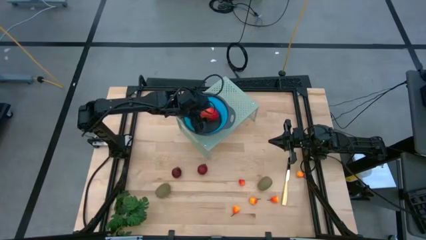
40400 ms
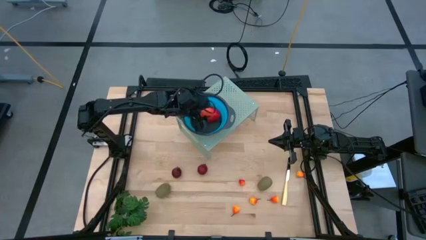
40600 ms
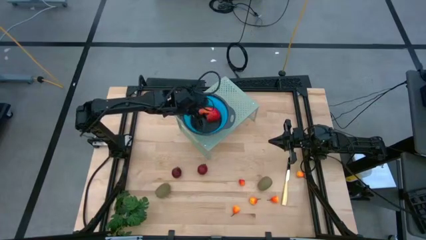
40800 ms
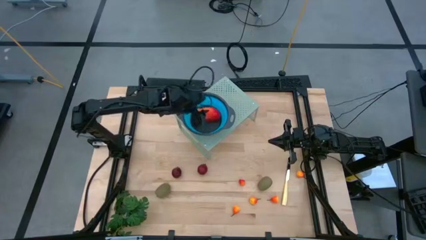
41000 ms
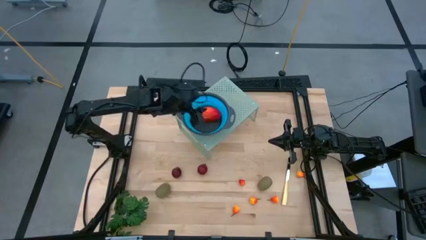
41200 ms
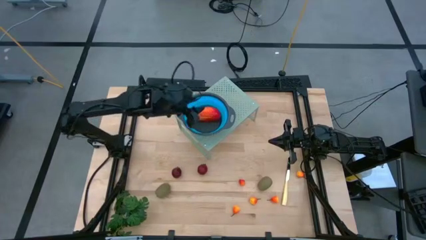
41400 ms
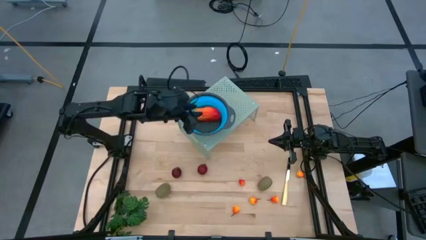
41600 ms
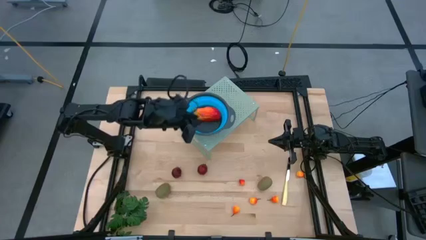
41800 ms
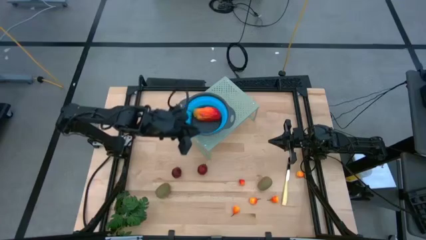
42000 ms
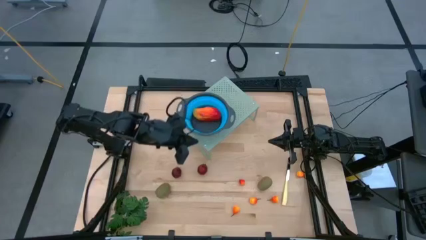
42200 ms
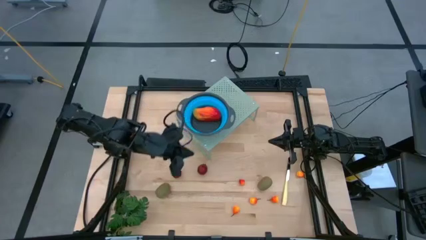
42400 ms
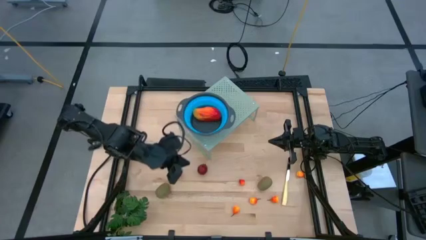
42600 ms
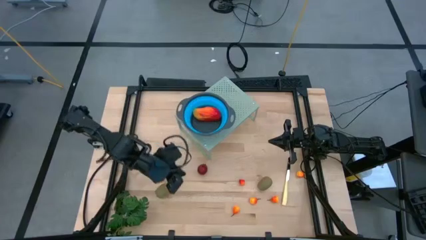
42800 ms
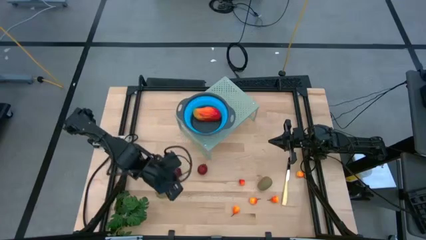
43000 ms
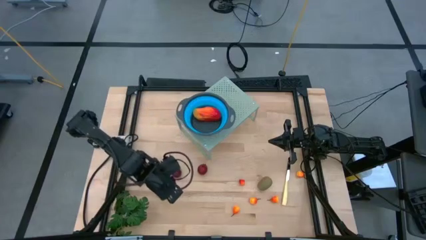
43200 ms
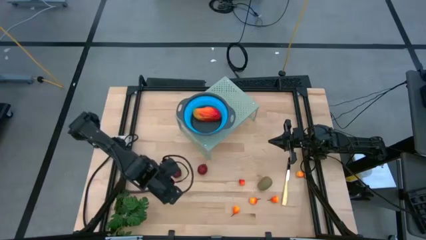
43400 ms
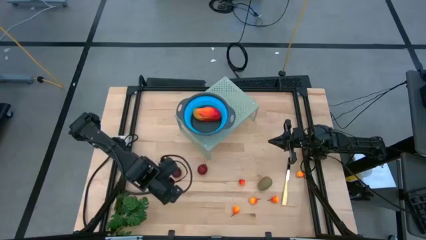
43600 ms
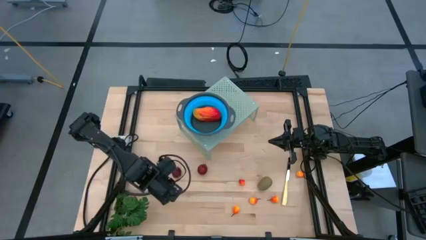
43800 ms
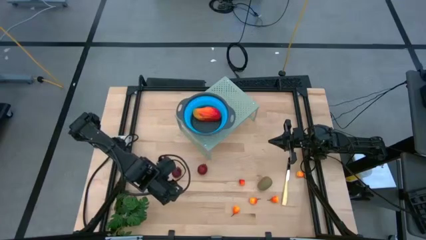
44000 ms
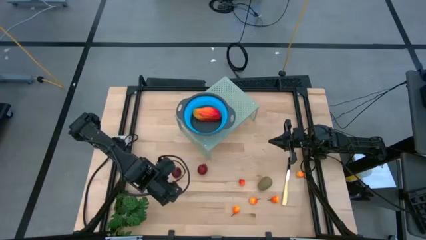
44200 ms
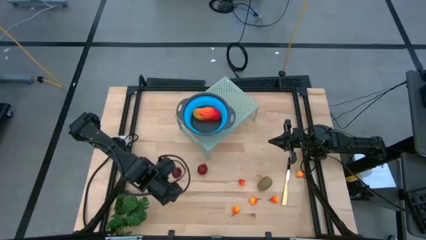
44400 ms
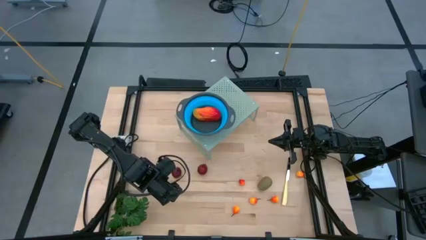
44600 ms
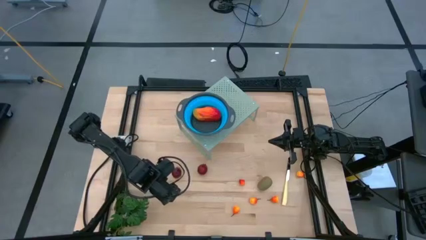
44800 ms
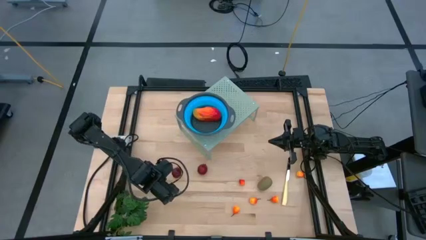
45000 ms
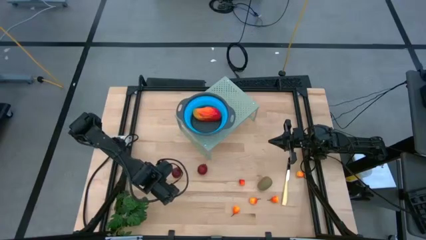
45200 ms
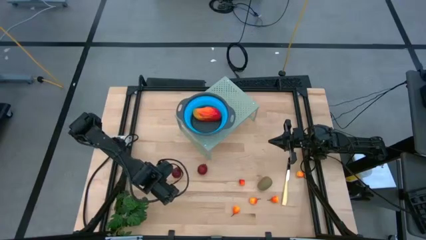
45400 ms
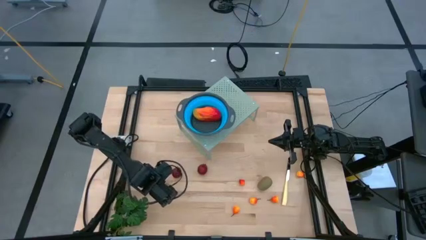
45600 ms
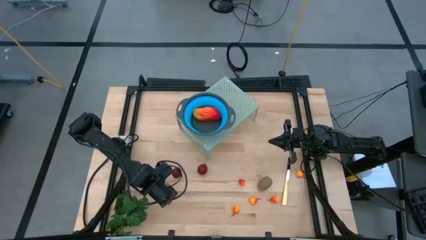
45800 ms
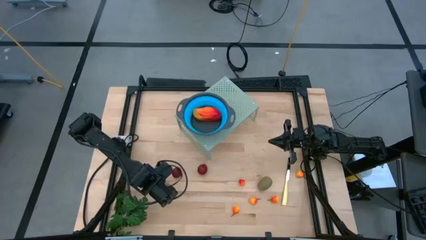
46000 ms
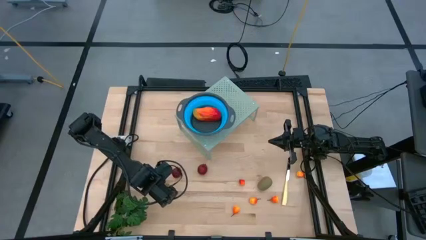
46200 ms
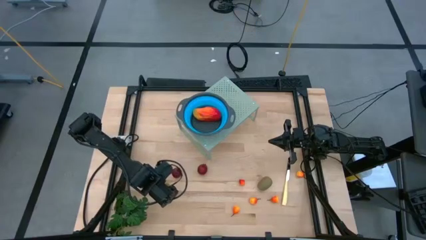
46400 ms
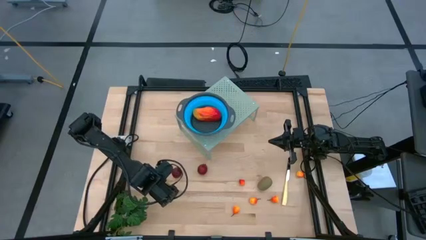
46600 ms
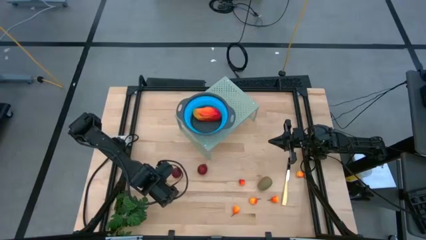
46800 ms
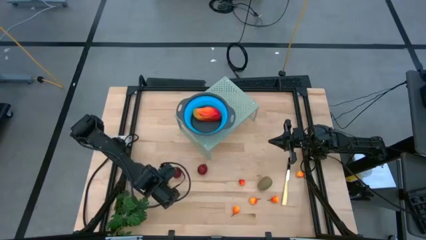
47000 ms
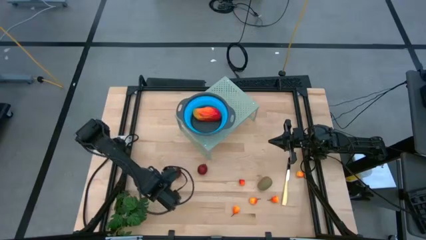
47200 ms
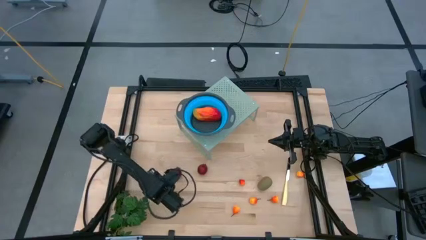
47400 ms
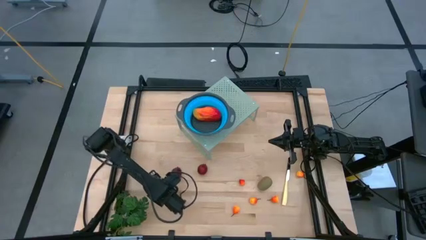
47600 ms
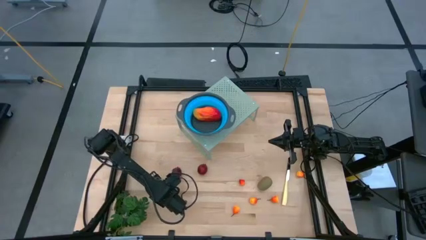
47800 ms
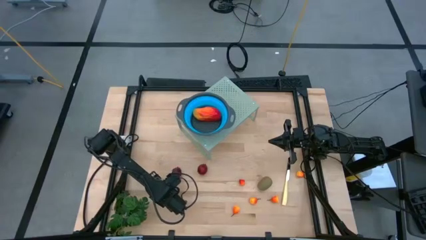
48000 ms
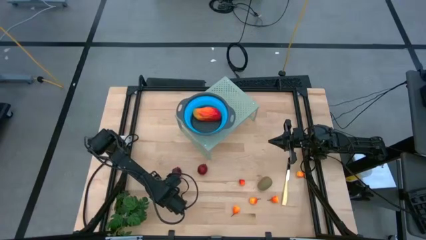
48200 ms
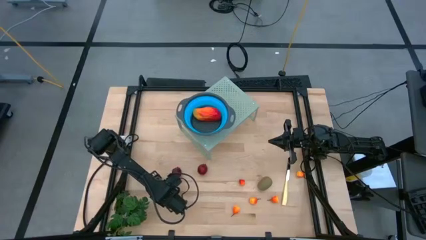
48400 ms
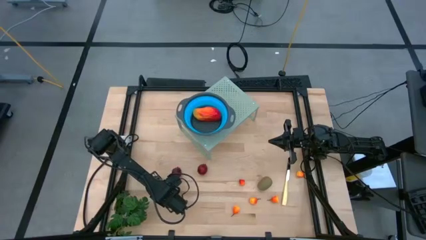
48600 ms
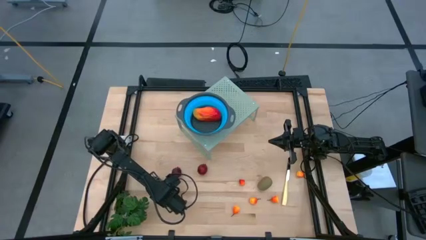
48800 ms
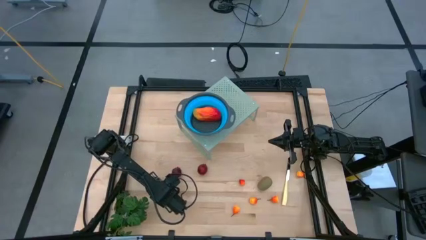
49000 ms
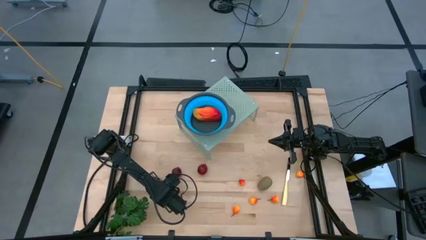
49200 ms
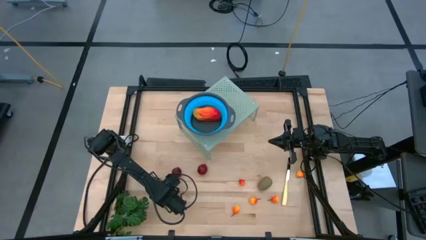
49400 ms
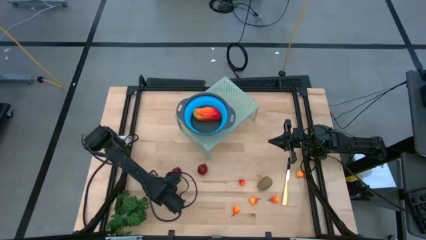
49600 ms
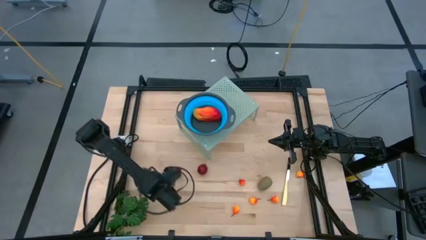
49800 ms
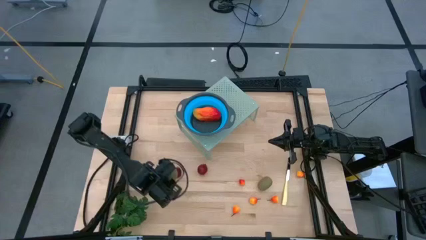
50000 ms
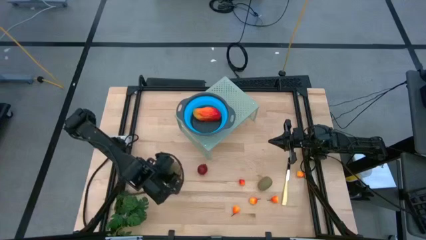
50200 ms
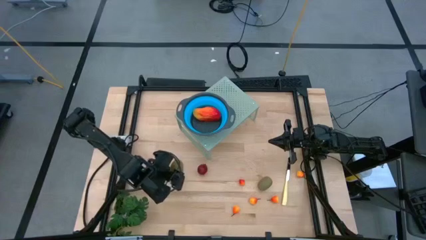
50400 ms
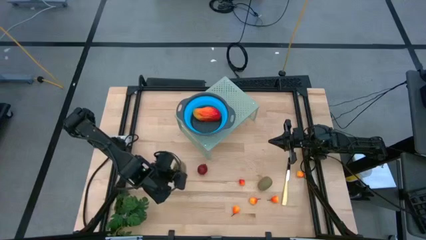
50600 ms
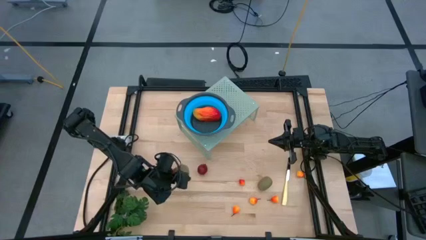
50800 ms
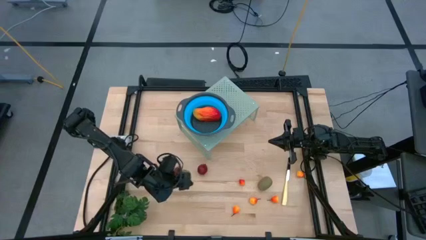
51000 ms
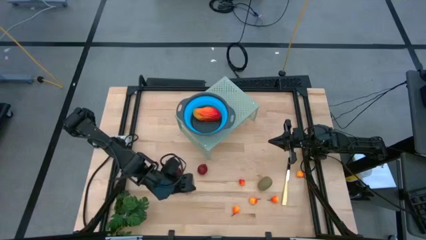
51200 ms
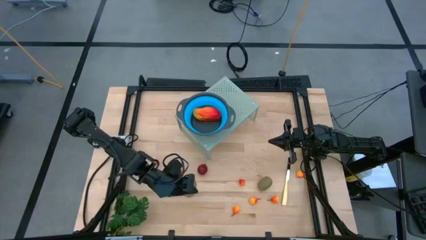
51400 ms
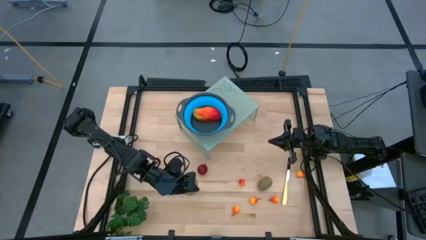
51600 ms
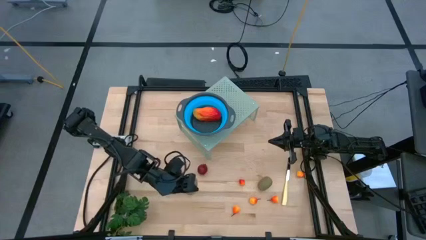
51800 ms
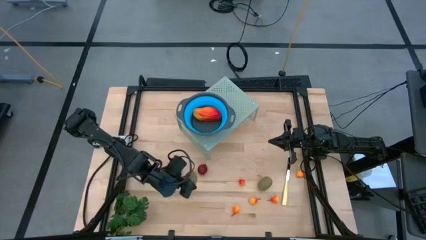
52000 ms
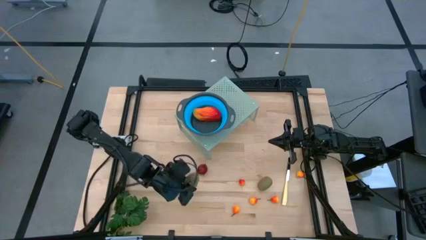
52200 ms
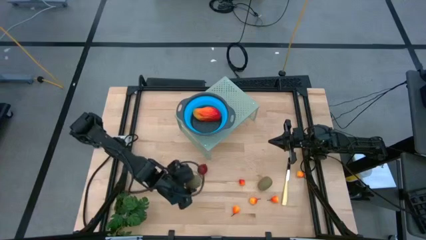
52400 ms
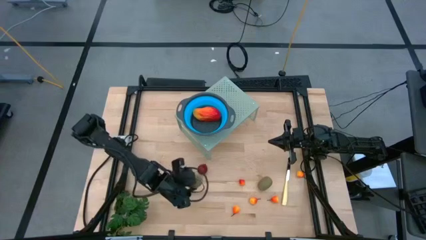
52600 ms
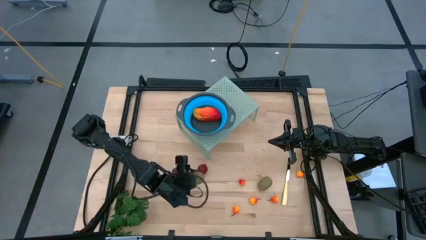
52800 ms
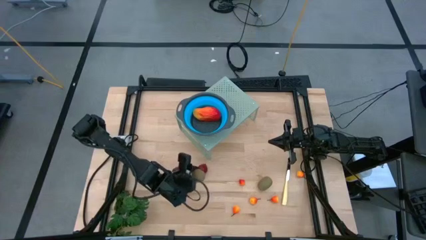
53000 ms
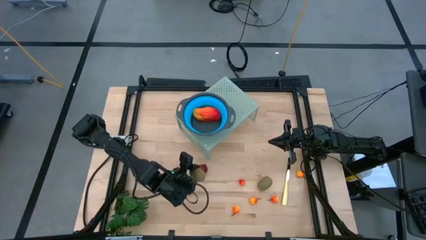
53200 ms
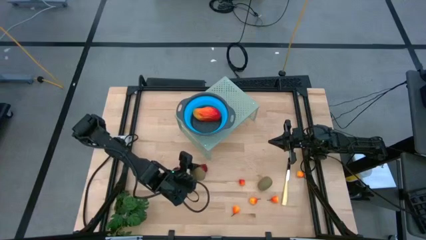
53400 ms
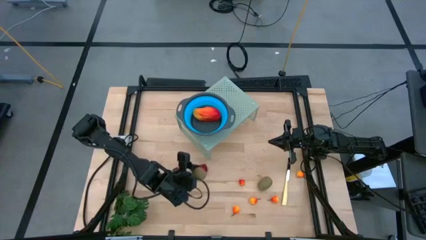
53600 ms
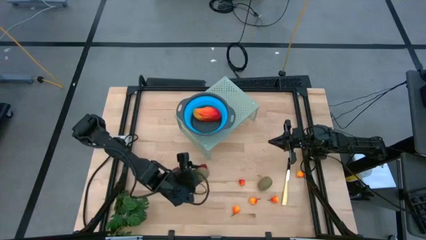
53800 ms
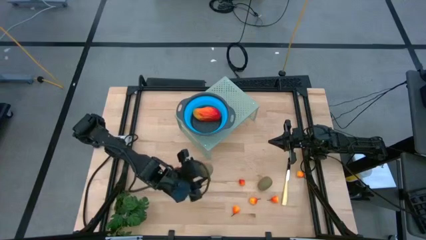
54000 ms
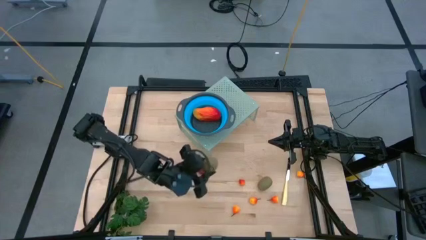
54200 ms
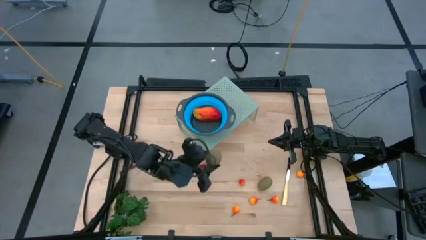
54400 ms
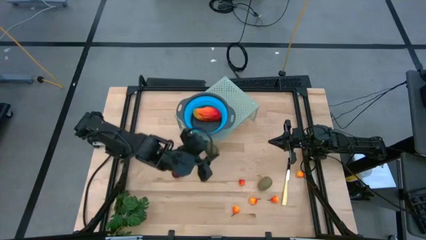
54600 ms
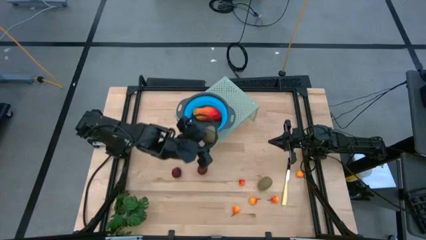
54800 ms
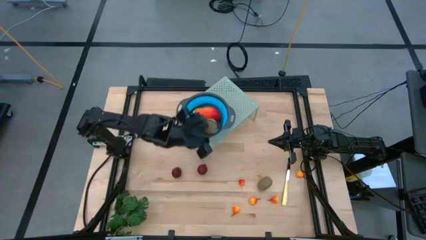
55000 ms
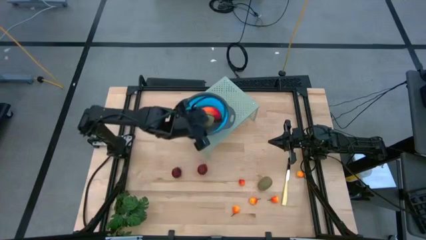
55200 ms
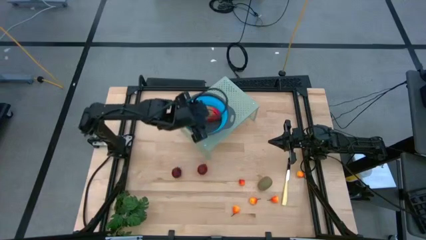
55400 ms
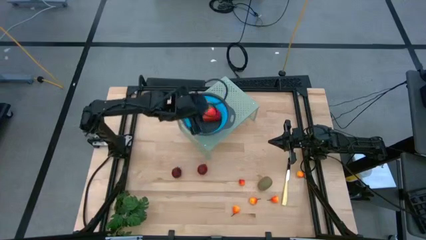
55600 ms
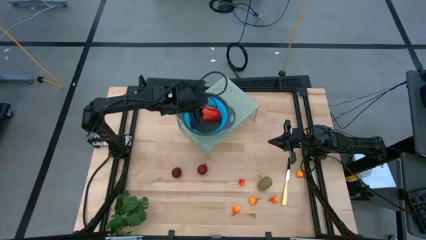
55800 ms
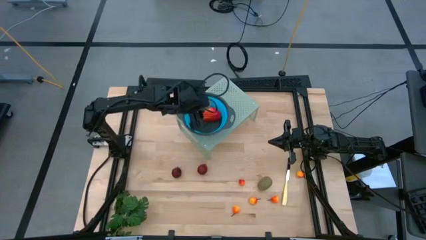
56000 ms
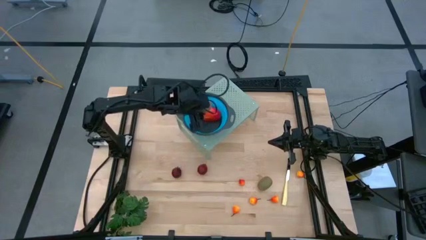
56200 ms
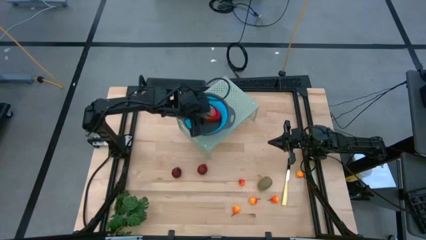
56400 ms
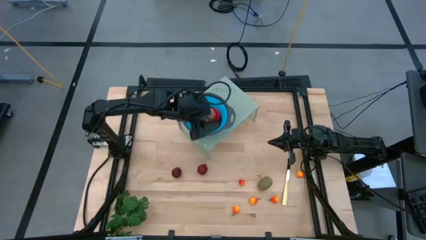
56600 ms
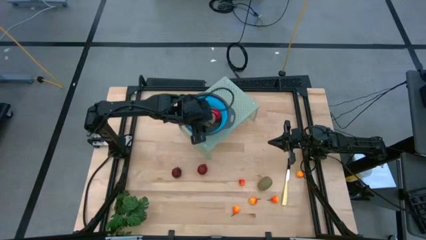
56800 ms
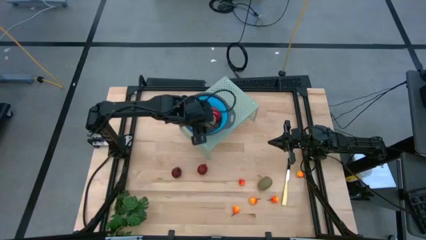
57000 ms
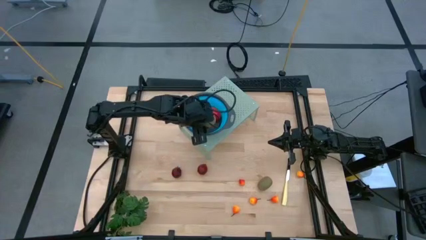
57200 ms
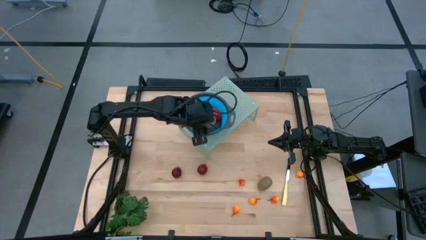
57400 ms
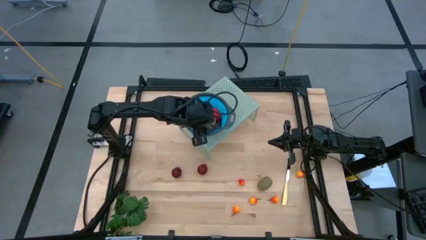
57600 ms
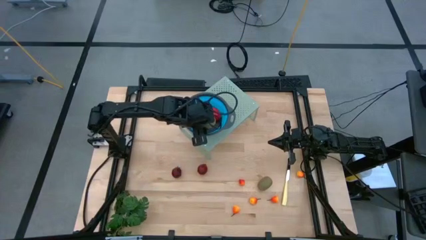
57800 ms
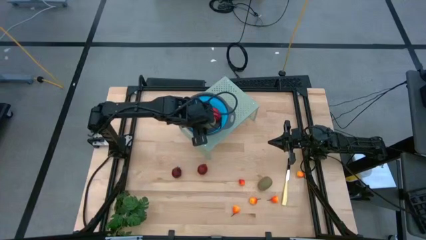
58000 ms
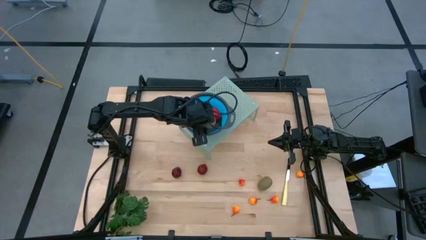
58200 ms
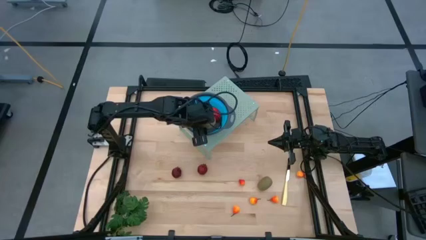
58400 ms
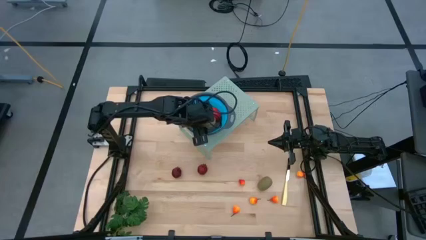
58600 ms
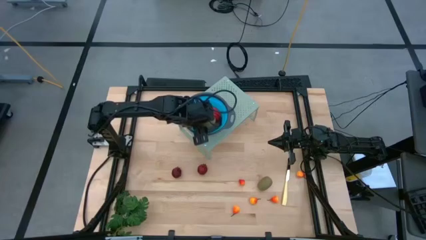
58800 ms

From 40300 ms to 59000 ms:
Task: Pick & Place Fruit
Put the kiwi into the collapsible colander on the shelf
